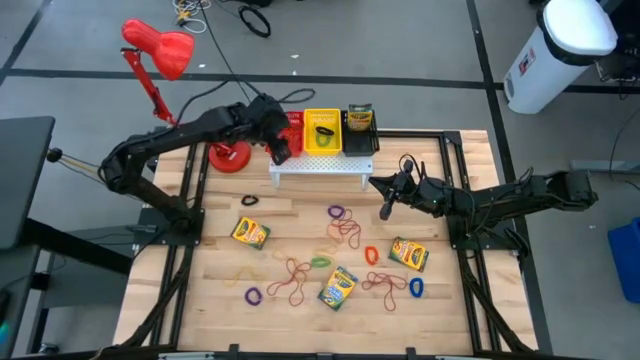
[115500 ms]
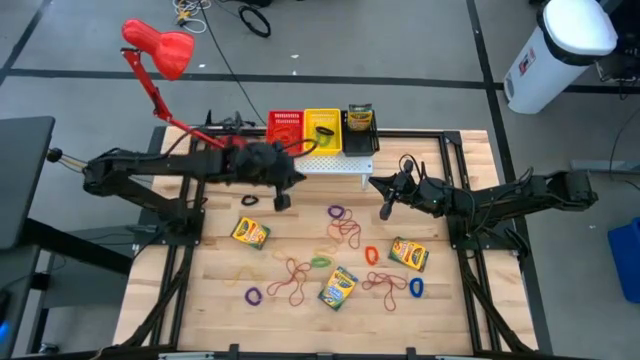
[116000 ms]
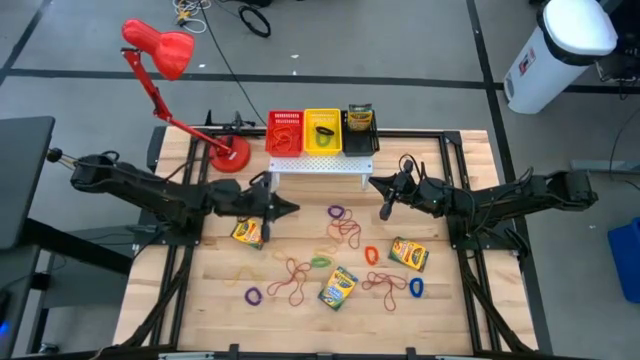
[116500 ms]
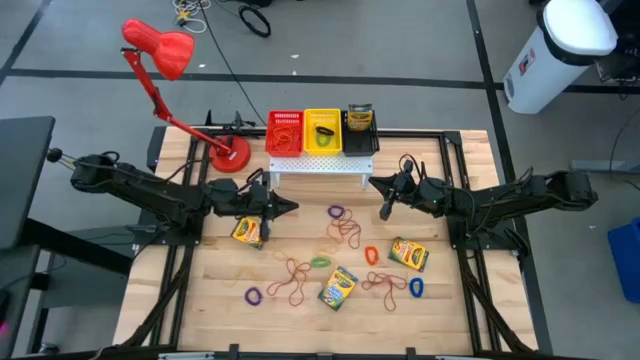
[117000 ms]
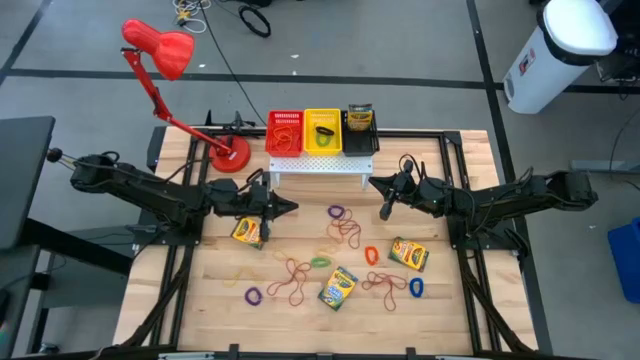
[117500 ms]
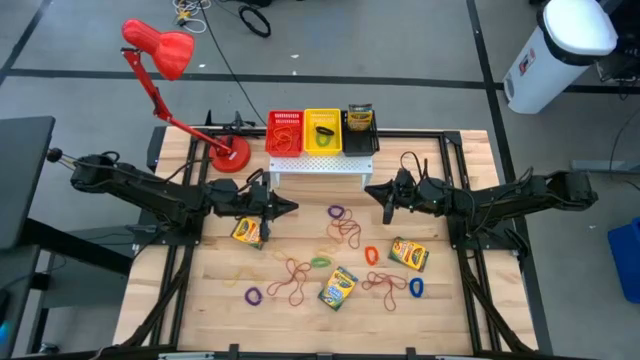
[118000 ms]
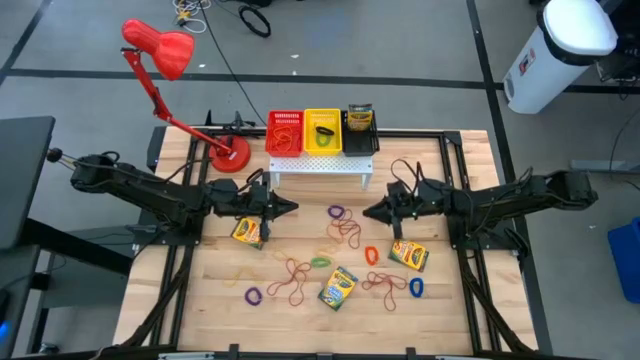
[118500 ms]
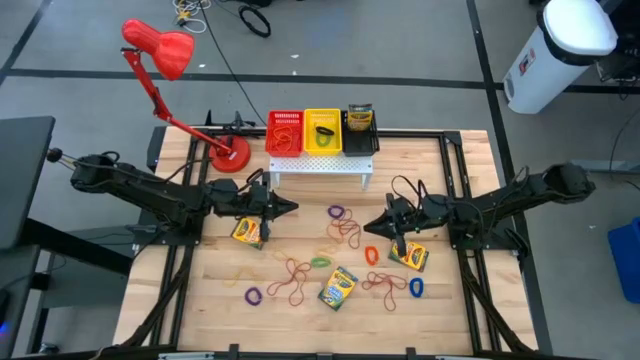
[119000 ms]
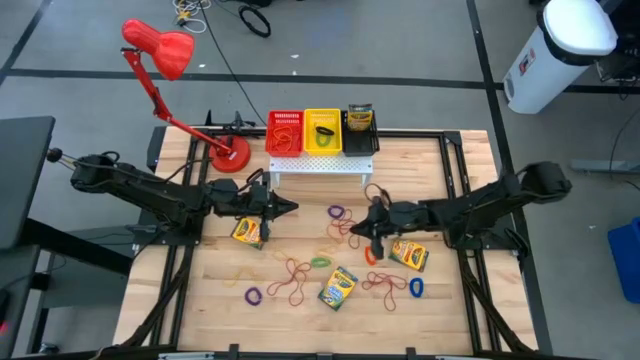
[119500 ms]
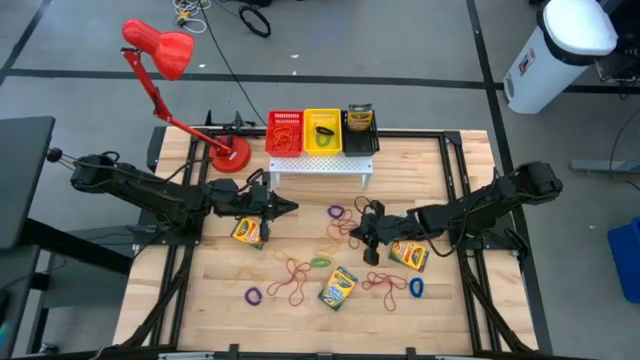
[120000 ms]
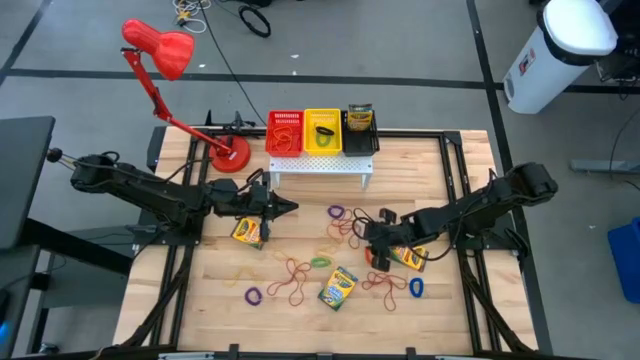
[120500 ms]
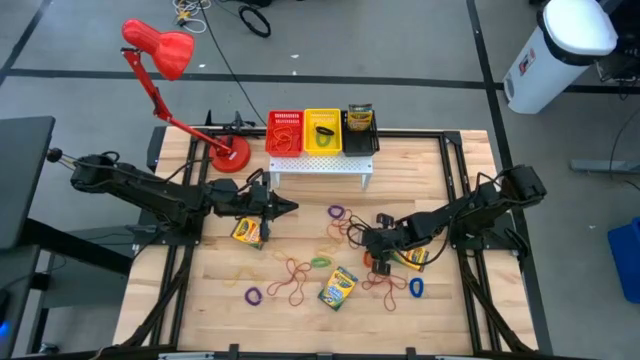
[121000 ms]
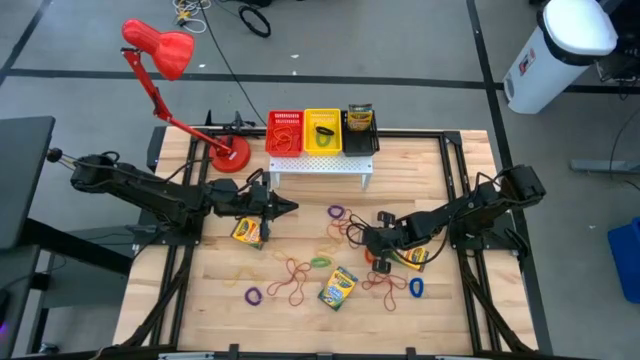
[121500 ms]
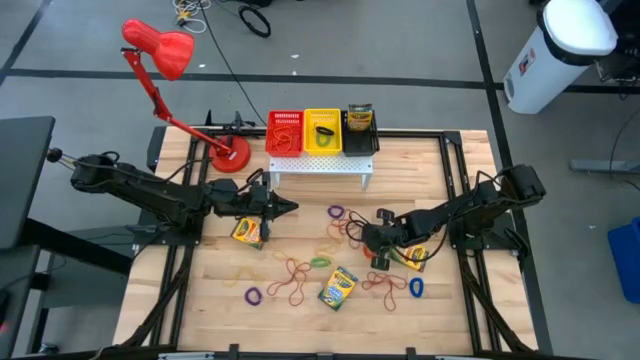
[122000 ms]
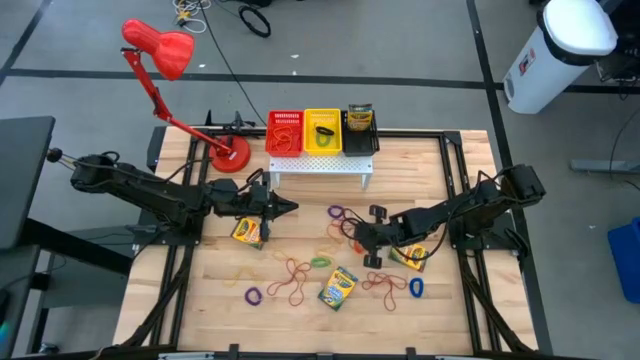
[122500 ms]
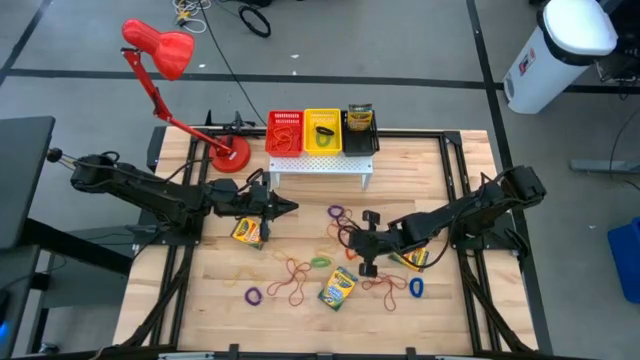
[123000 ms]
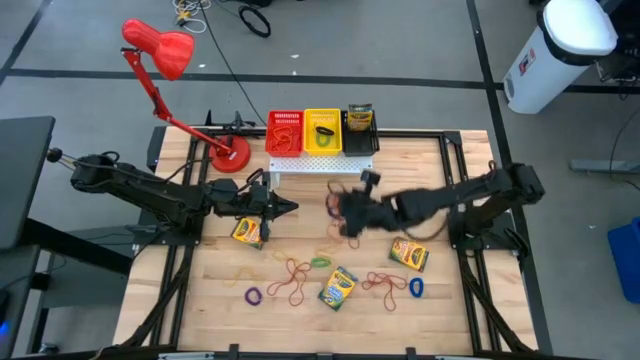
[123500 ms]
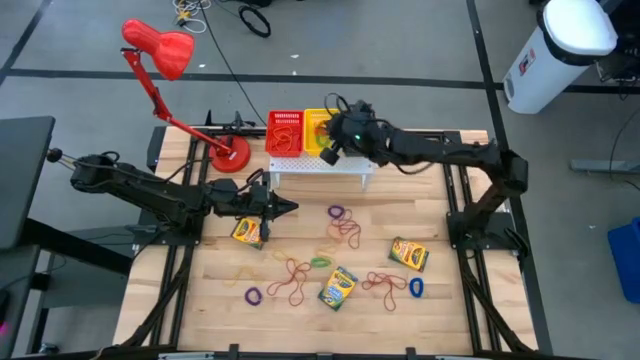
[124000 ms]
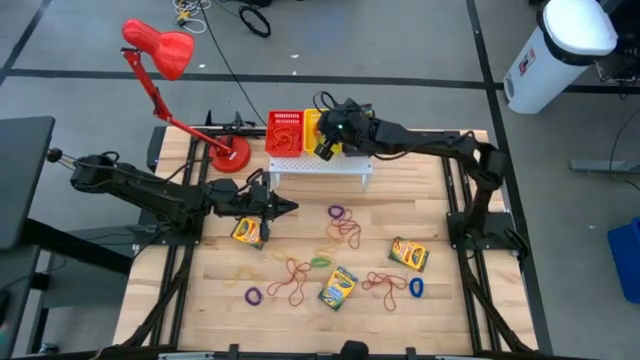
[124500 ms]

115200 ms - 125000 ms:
Task: Pick & Place Office Desk Supplies
Put the orange spring keychain into the yellow bin on the shelf

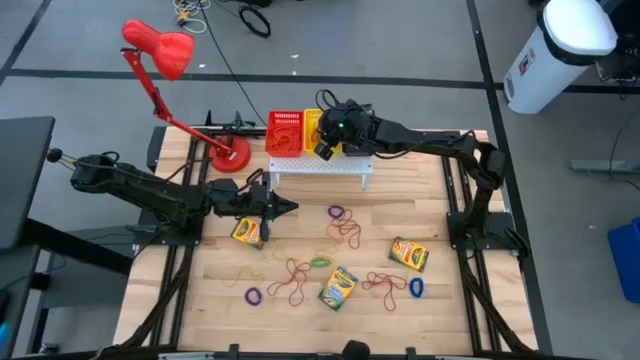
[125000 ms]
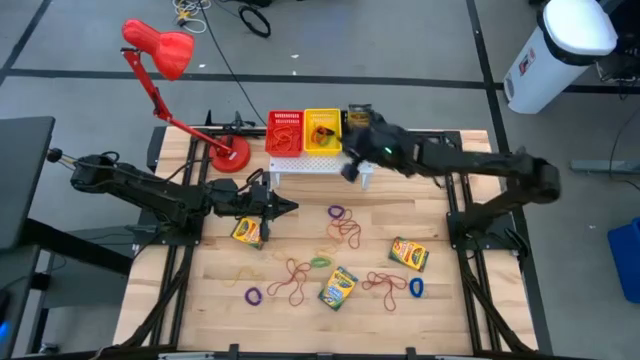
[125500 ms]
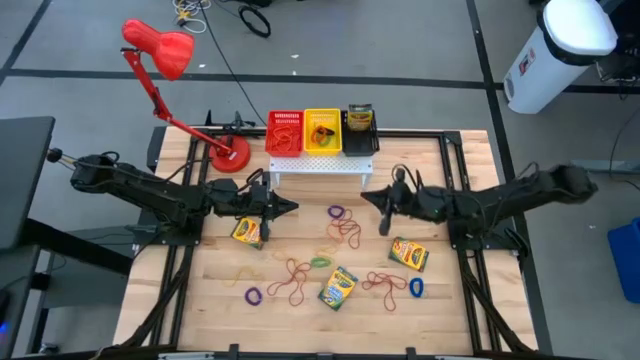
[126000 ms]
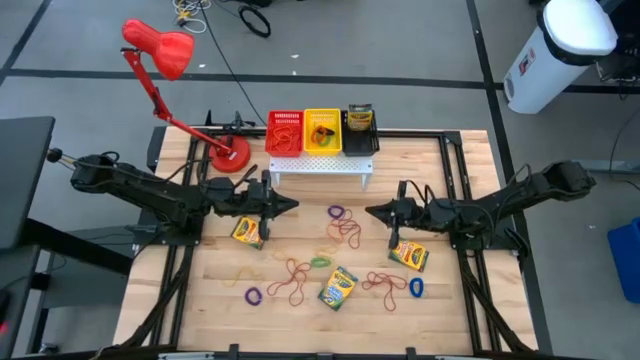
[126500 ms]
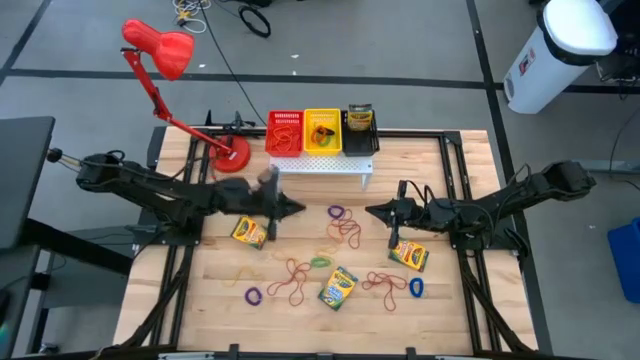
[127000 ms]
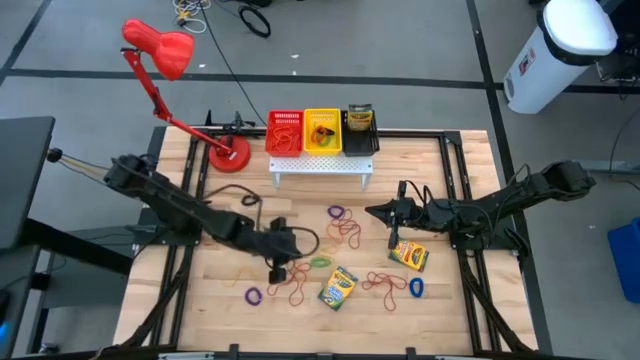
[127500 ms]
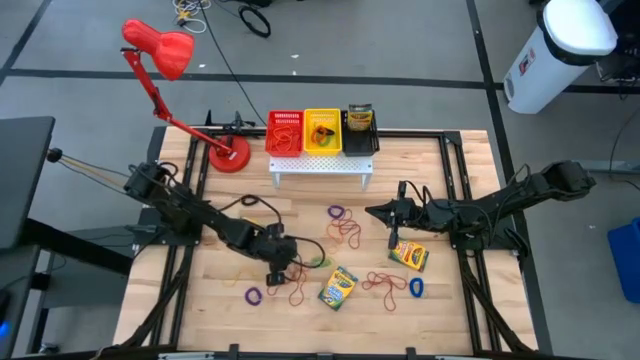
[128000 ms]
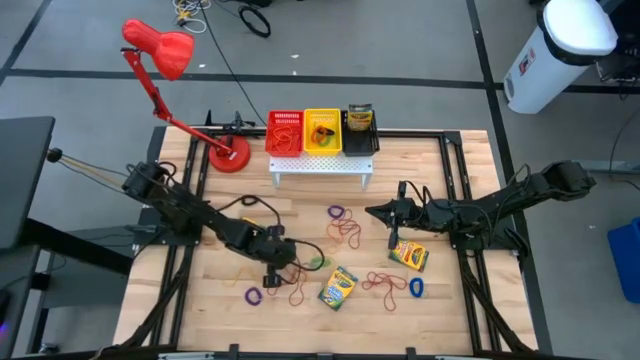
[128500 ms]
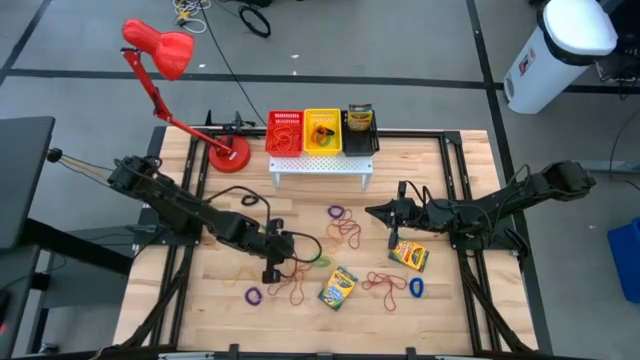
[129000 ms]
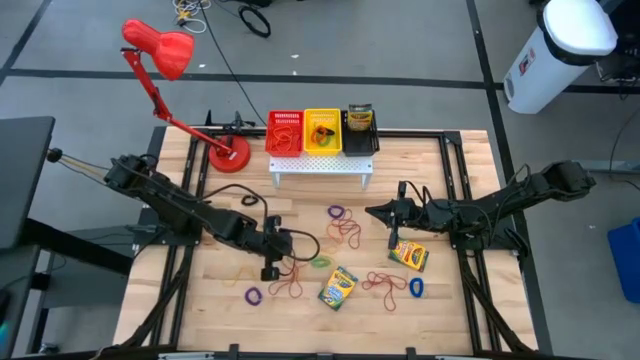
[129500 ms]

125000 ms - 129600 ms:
Put the yellow rubber band into the red bin on the shelf

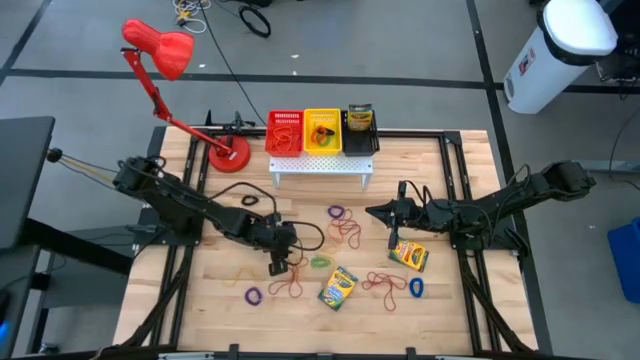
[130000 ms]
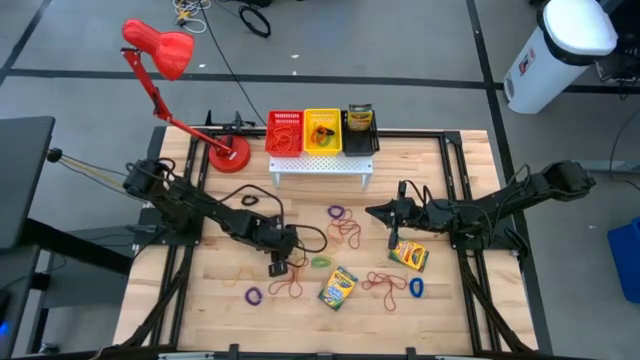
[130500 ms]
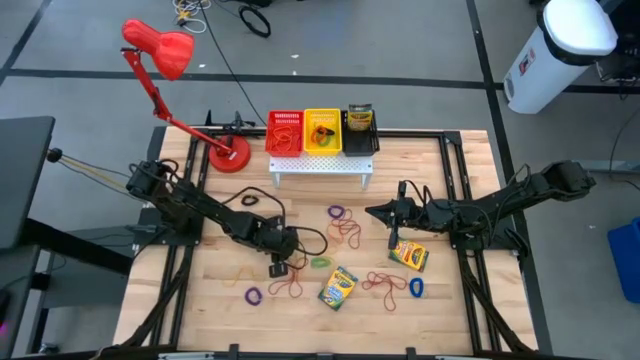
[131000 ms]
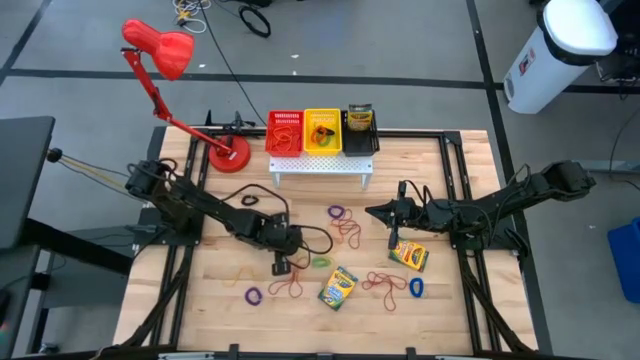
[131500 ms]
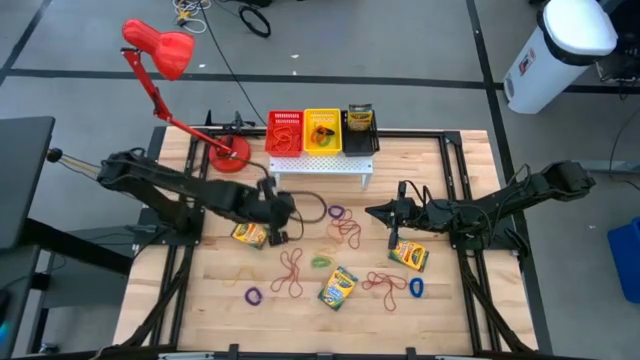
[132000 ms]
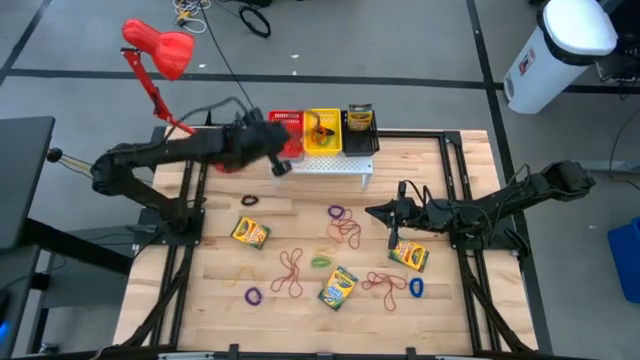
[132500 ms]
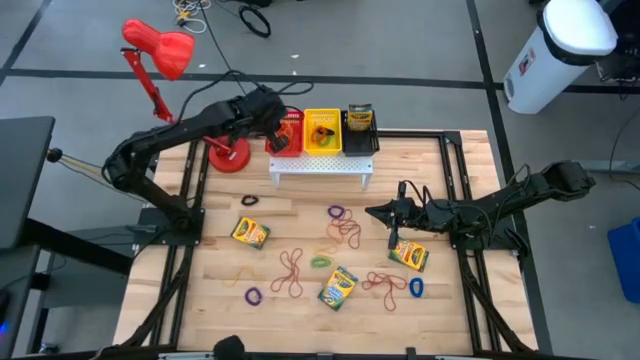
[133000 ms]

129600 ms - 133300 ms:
Put the yellow rubber band into the red bin on the shelf

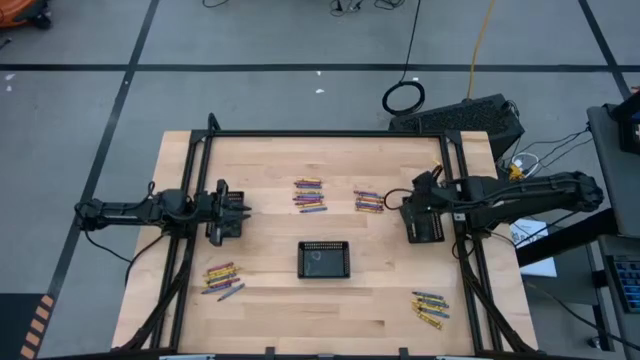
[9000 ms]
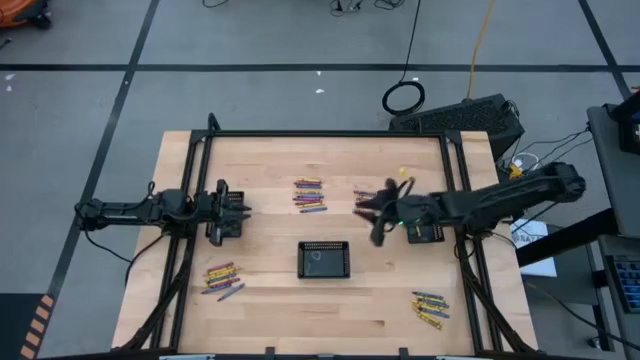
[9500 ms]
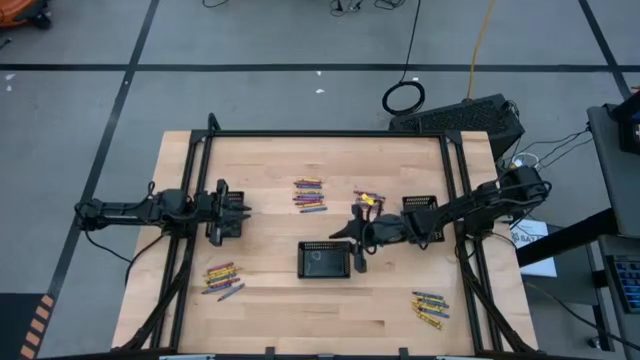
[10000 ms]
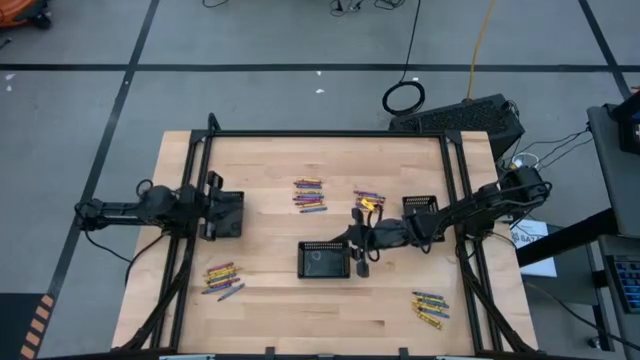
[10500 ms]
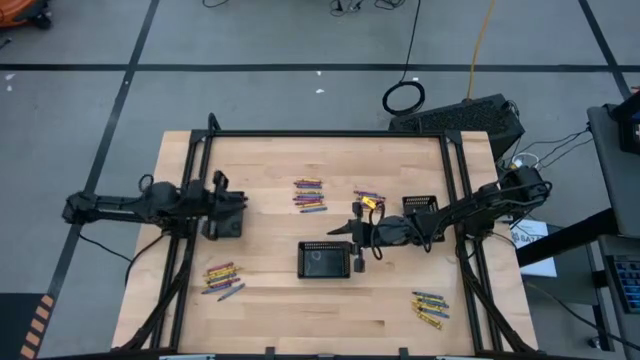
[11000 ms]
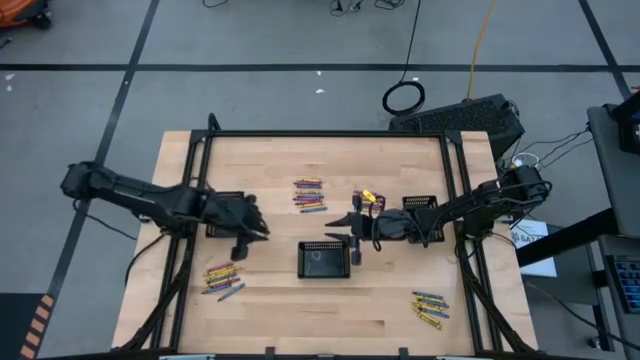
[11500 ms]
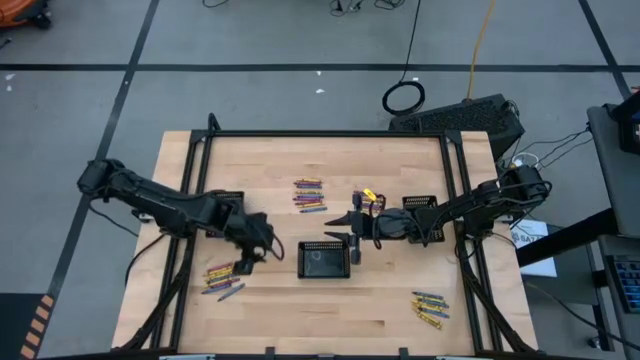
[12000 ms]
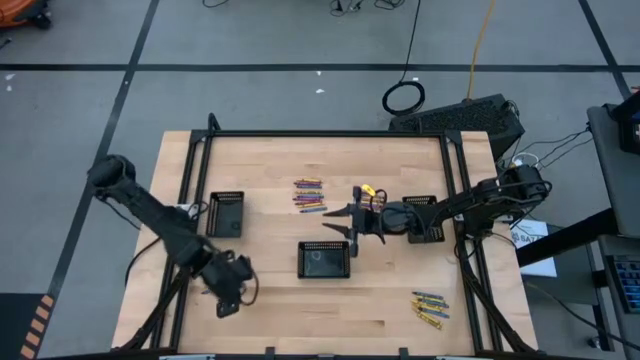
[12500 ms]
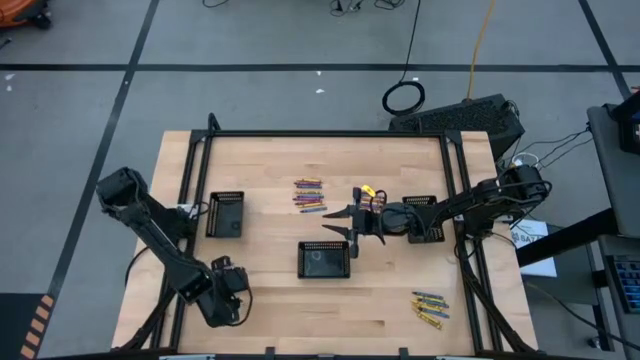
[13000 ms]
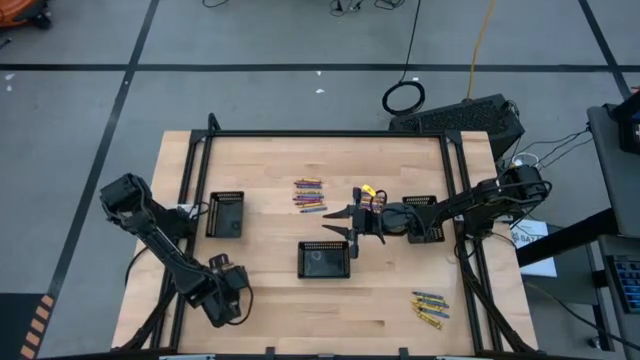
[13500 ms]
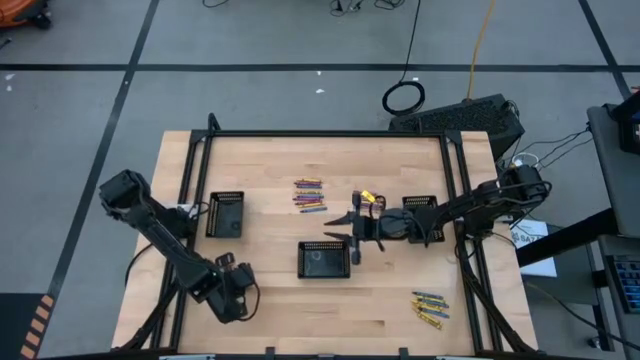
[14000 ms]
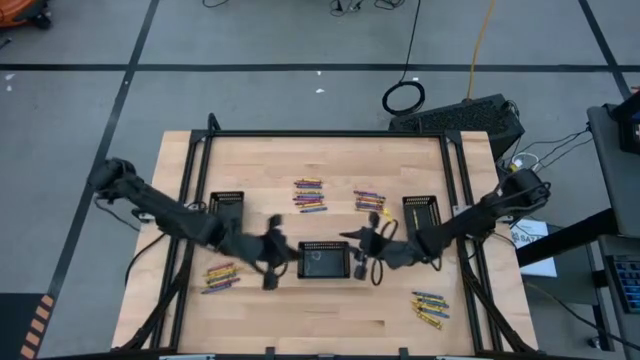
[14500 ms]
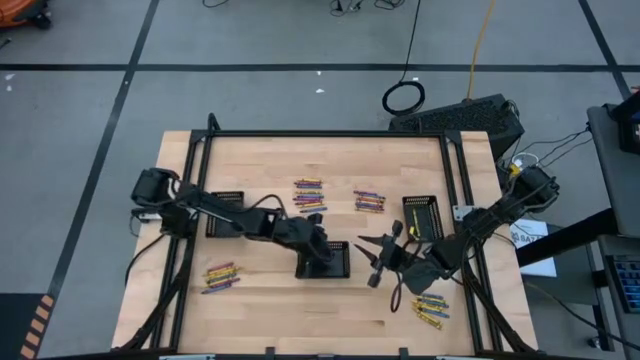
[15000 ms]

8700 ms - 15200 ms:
Task: Sort crayons
Put the blue crayon into the center black basket
